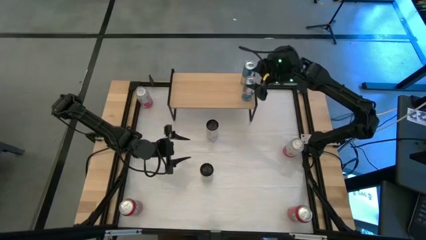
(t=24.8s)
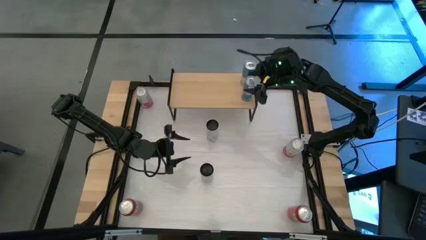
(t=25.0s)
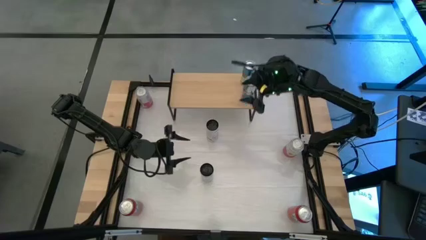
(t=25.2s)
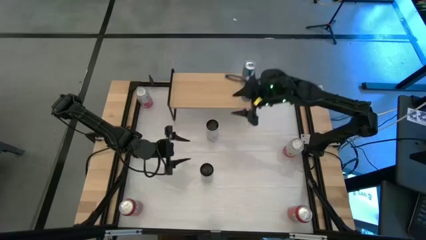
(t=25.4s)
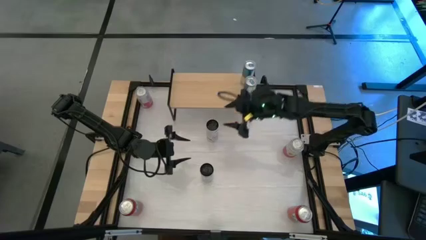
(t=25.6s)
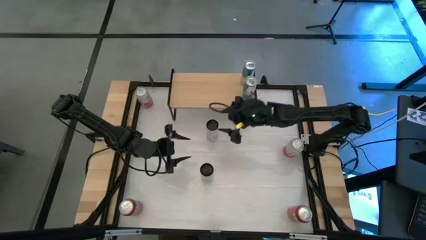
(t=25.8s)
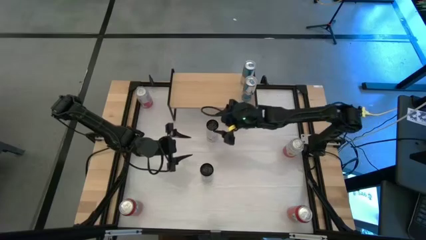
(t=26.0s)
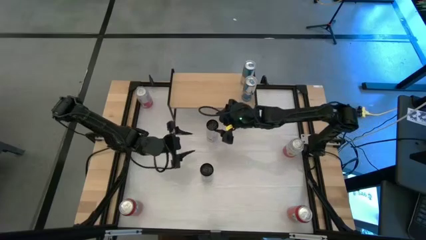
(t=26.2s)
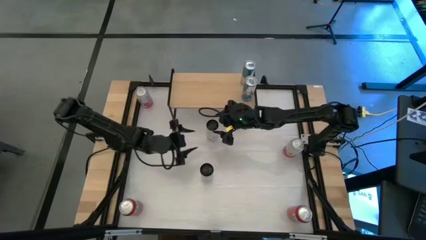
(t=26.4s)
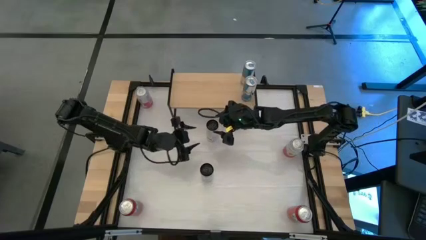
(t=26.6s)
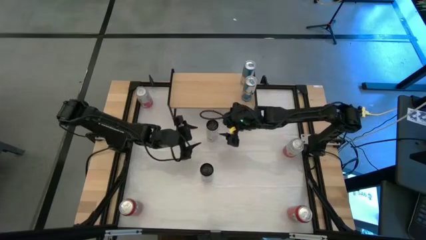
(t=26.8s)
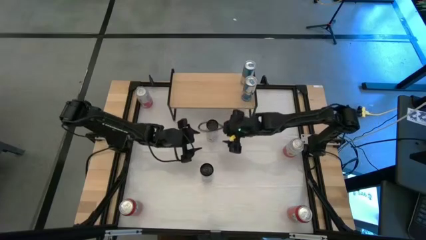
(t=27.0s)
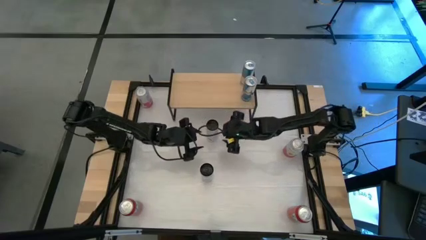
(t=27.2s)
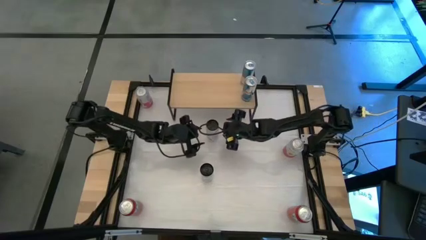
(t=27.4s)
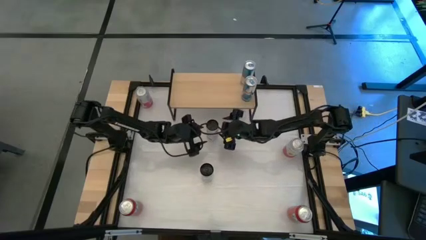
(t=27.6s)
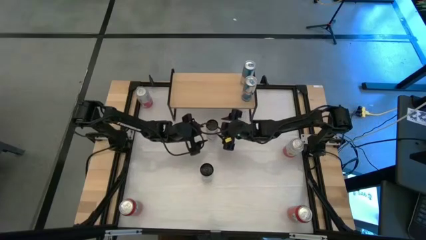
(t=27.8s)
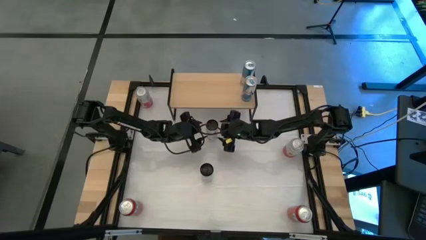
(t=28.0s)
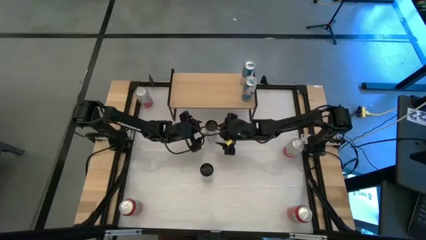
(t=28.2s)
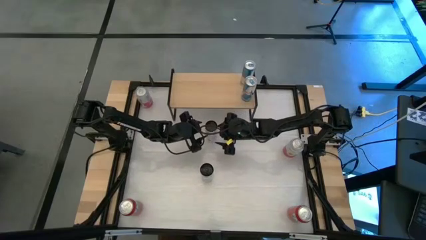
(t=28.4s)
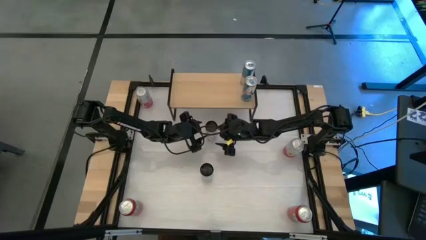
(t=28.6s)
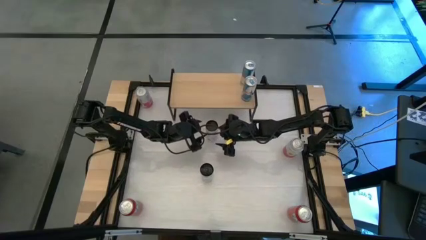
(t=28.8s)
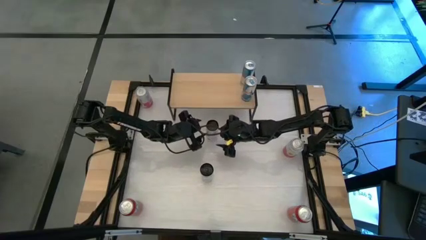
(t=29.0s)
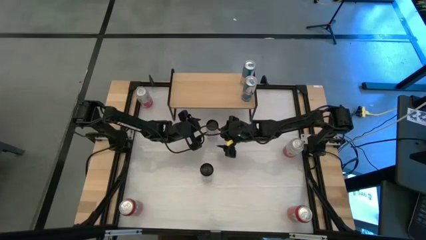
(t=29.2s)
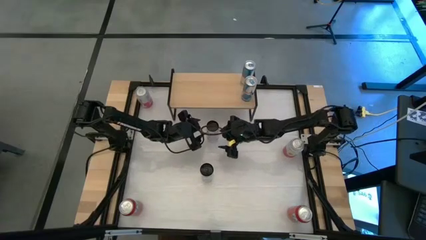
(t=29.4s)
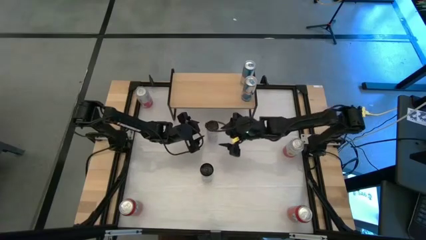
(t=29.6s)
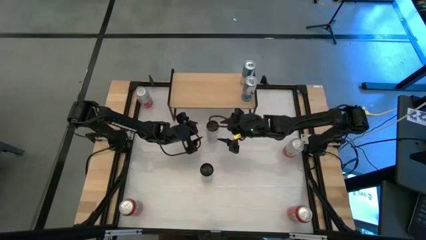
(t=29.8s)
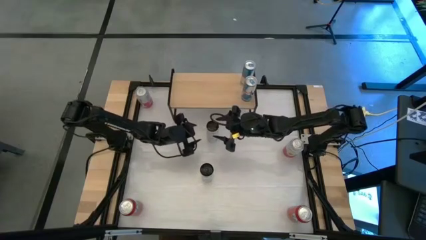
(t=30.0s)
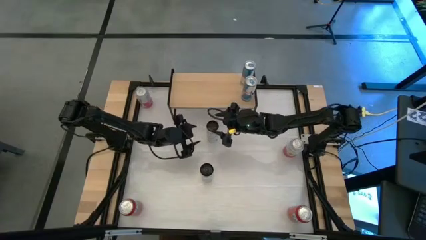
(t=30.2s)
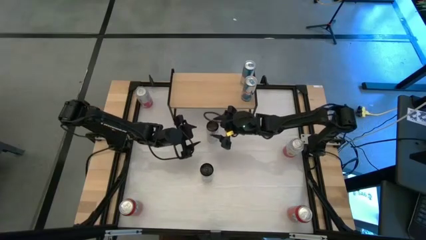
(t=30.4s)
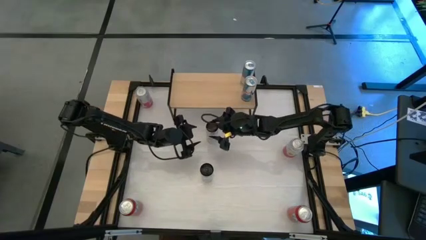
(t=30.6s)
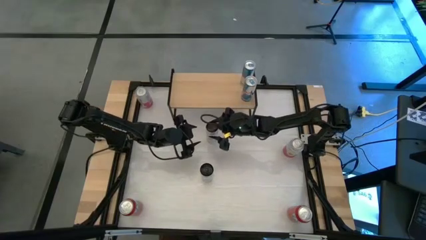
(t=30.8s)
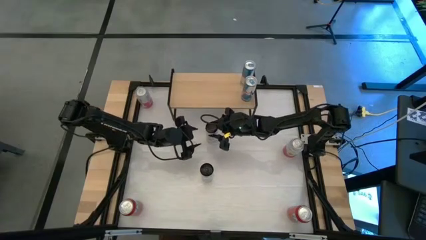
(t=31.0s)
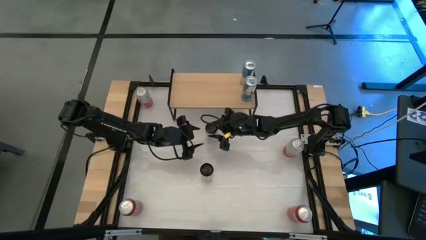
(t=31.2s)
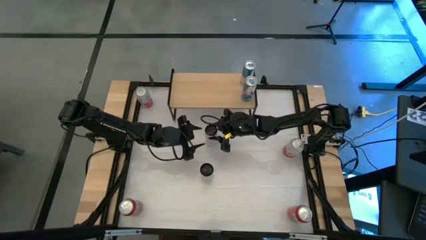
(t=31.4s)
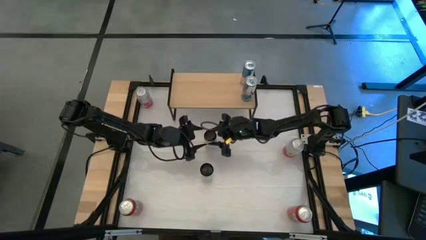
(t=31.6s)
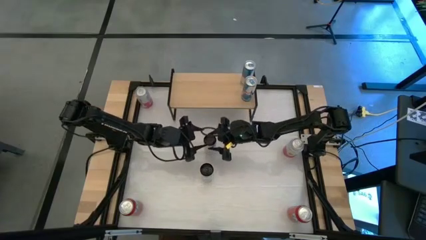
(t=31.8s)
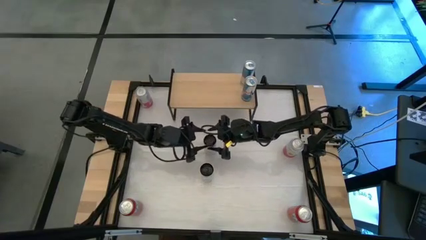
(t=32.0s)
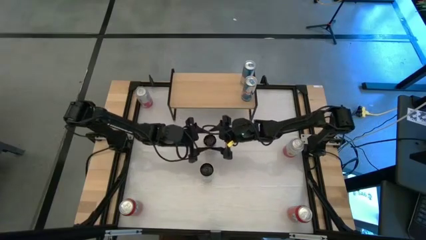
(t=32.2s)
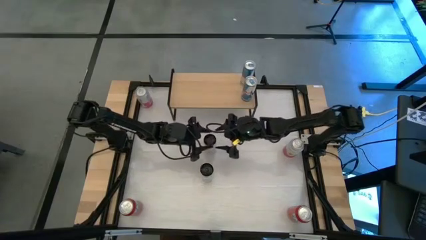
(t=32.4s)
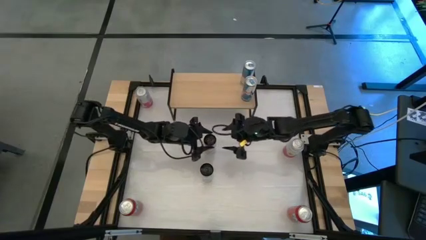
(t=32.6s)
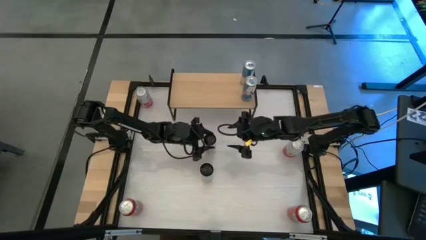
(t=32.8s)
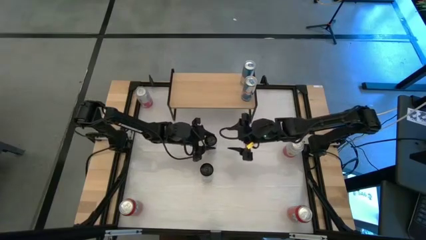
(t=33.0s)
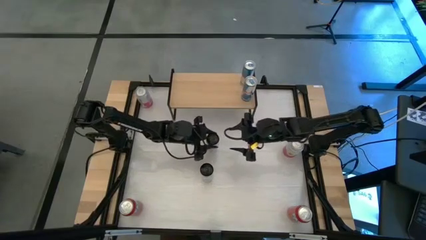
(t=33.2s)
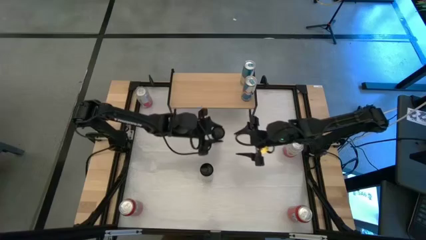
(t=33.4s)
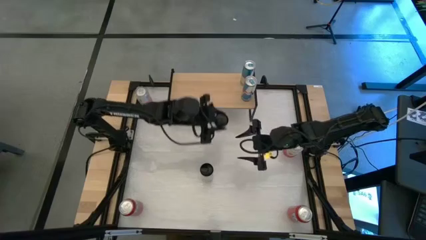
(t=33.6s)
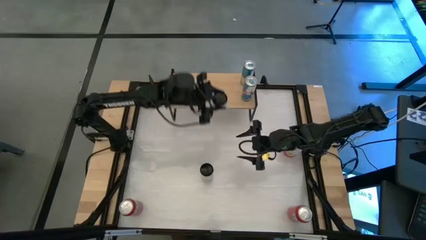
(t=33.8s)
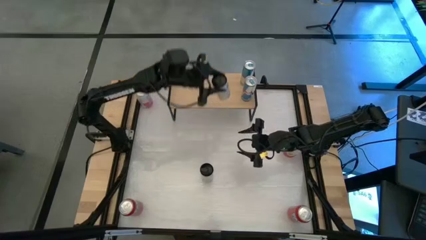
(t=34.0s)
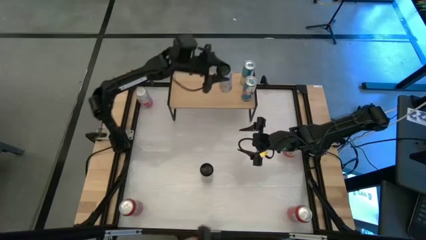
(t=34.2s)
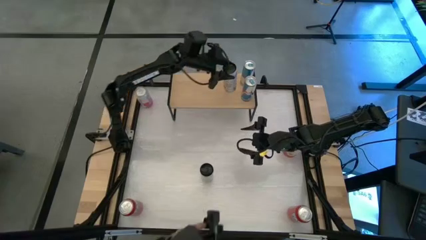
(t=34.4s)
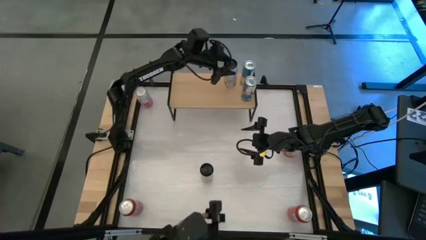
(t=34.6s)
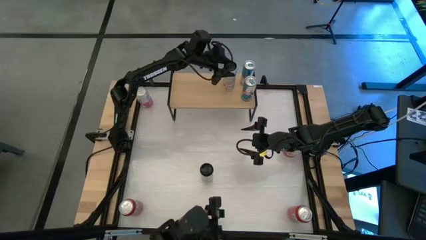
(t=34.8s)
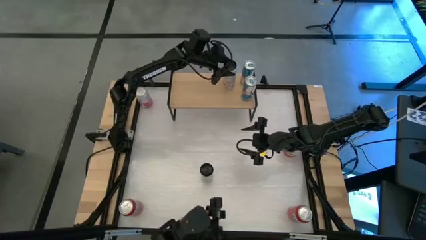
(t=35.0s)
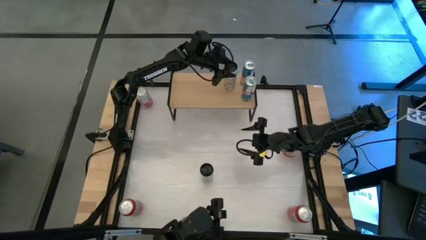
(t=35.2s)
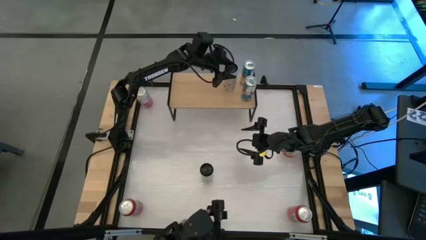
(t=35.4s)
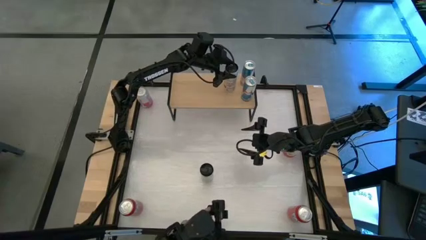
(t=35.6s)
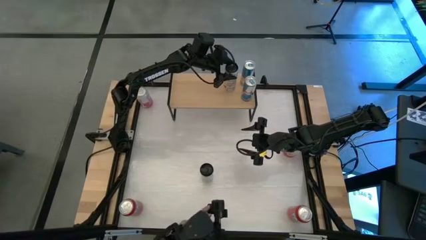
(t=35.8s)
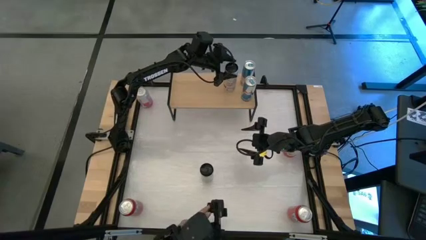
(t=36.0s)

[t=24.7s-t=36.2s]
Task: Place canned beverage on shelf
Put the top white pink soda can on the shelf

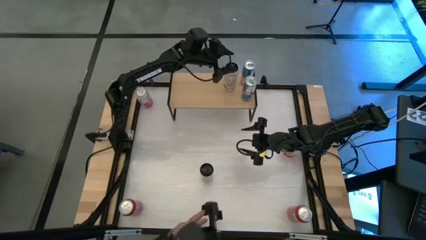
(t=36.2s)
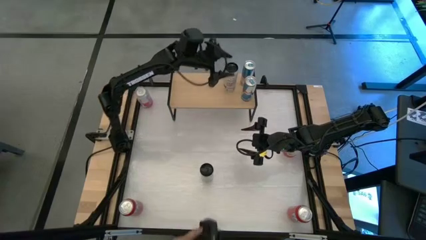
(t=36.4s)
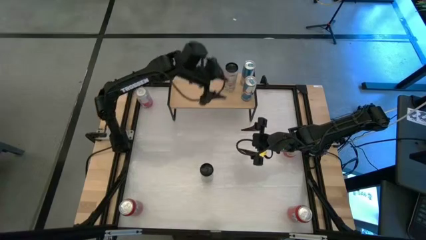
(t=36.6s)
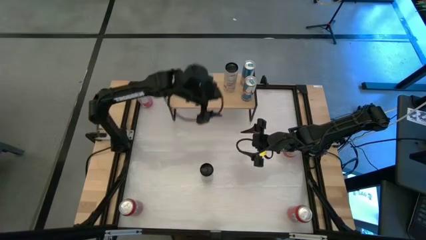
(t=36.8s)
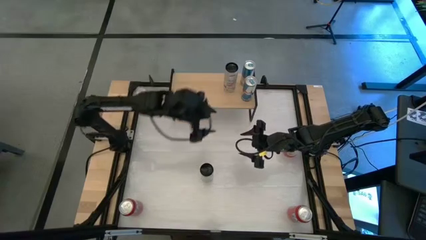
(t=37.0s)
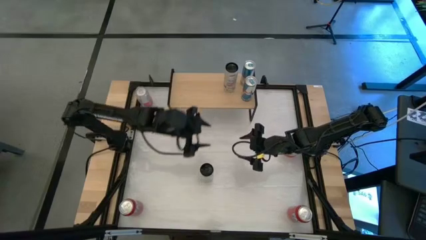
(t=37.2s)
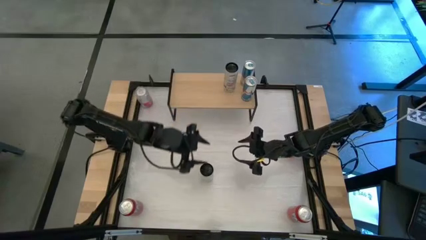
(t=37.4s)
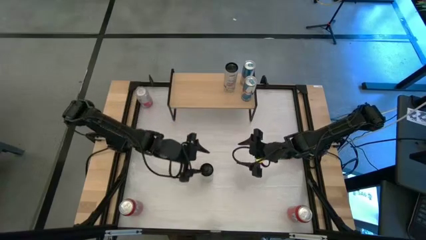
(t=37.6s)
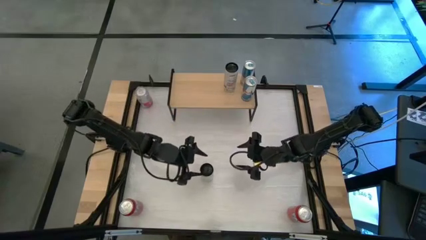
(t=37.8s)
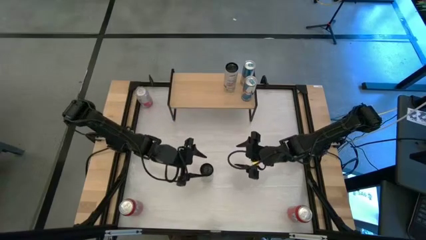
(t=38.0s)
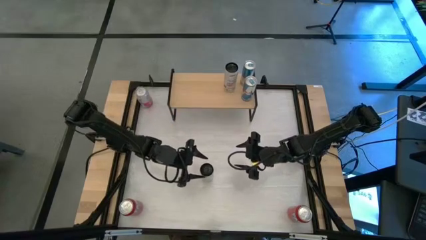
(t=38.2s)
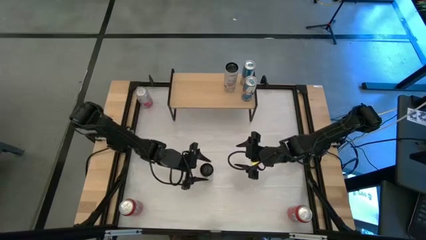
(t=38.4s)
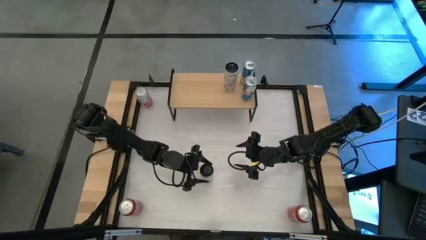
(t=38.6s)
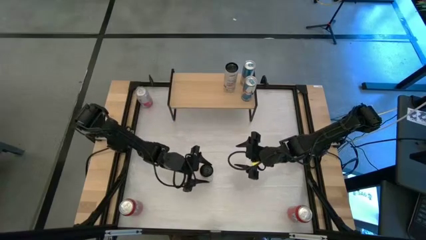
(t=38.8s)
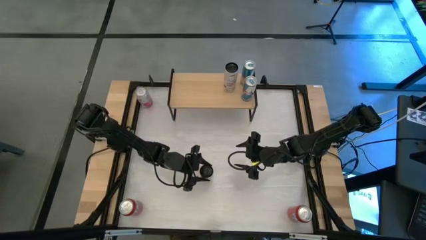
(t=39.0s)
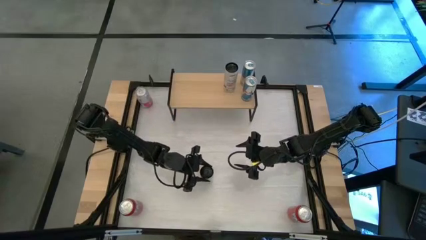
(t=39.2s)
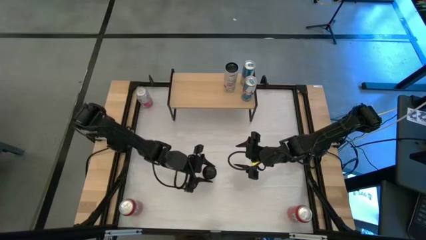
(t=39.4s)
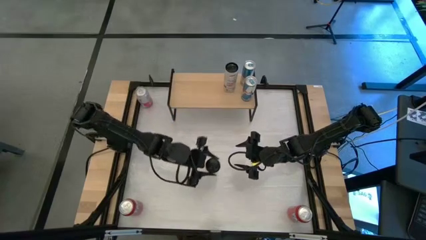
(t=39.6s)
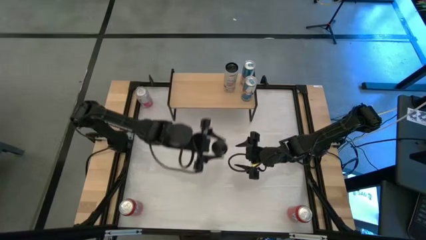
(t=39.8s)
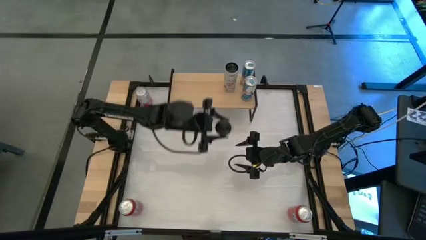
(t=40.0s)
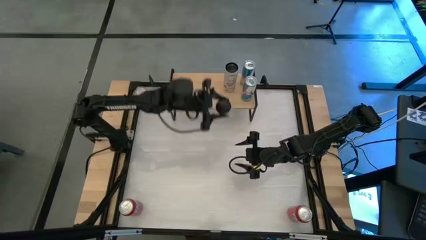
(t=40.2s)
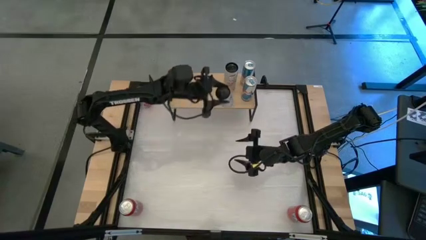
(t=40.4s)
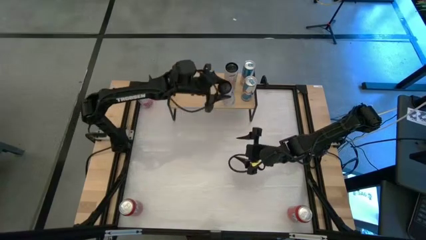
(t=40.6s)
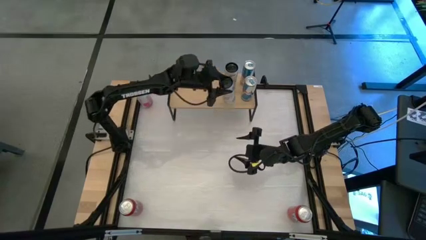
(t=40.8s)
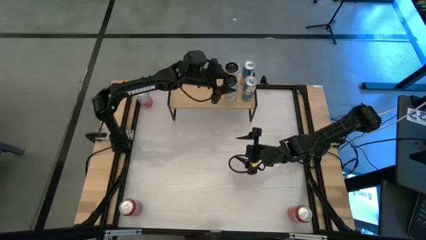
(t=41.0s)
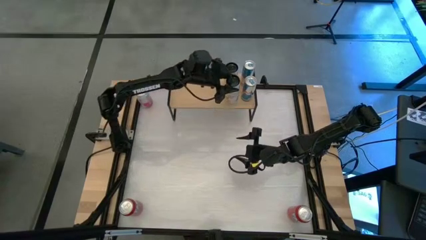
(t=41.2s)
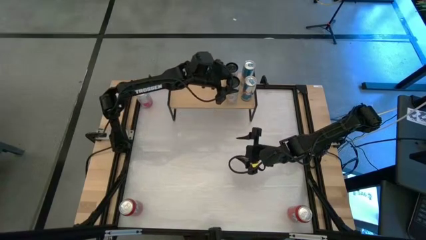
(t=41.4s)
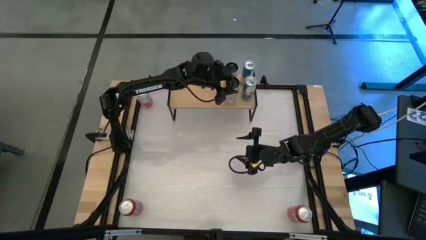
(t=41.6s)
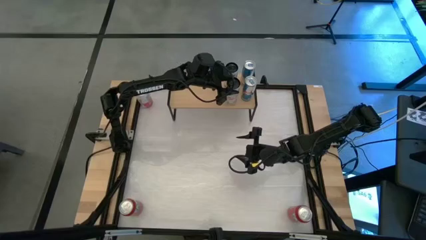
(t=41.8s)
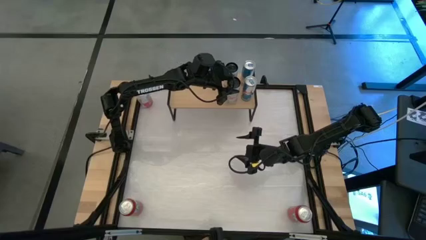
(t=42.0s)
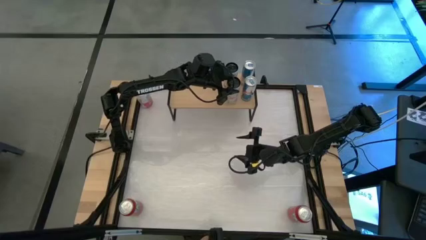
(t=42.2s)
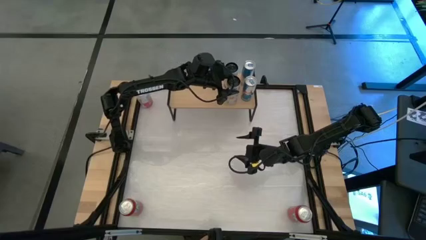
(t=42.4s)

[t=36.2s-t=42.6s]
Put the white pink soda can on the shelf aligned with the other white pink soda can
